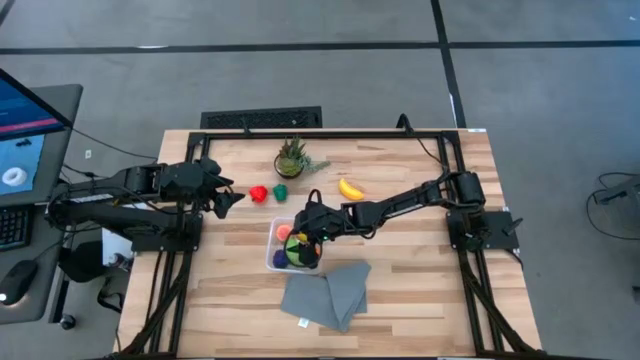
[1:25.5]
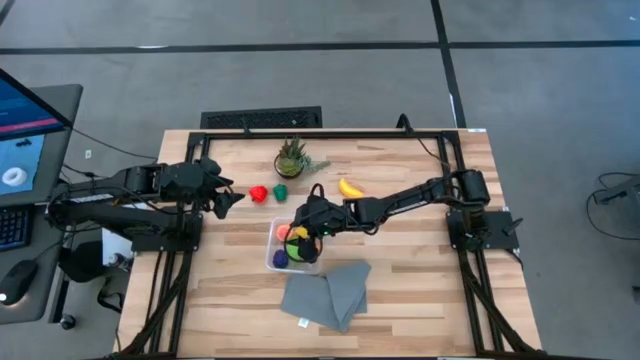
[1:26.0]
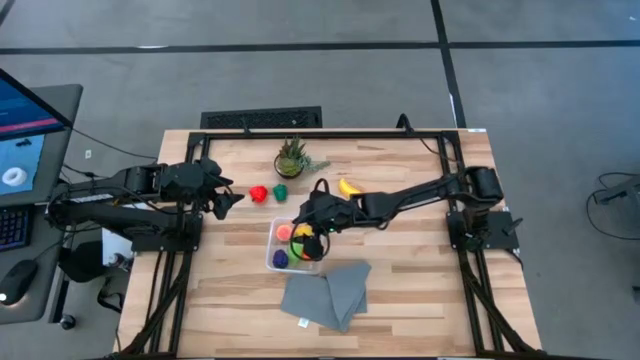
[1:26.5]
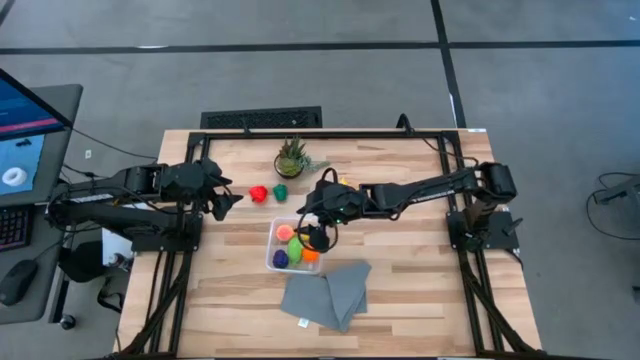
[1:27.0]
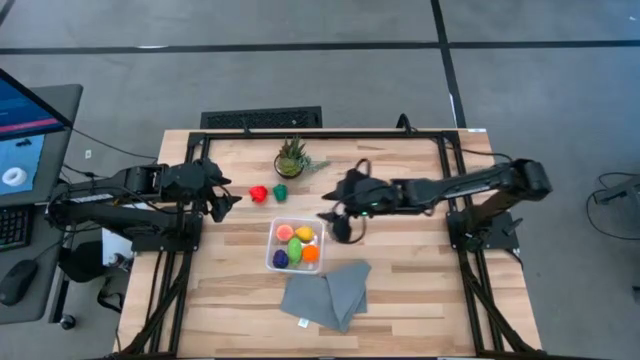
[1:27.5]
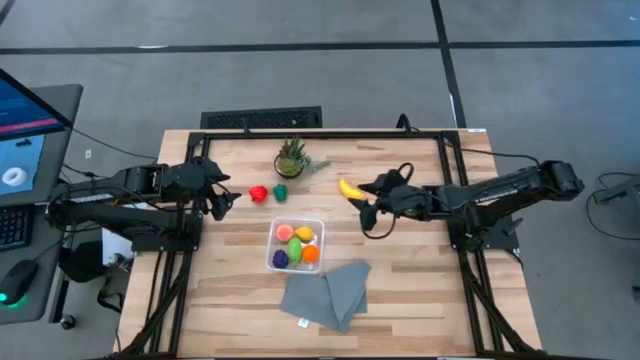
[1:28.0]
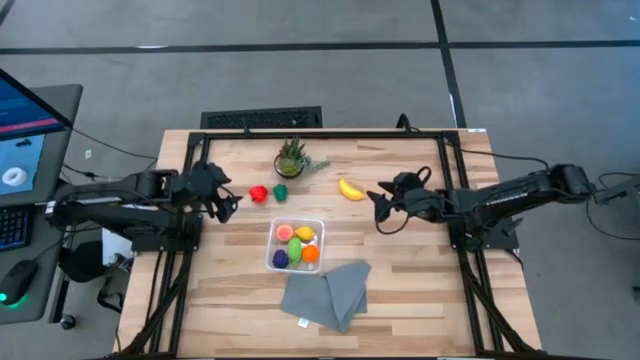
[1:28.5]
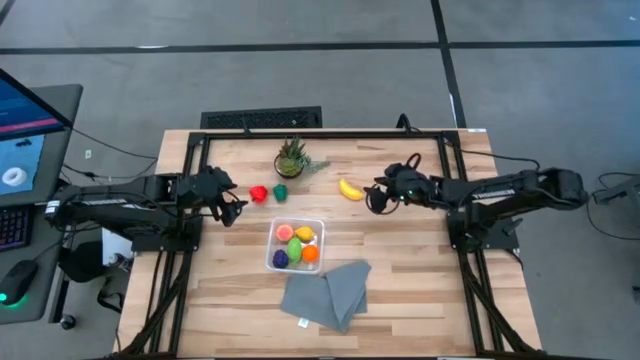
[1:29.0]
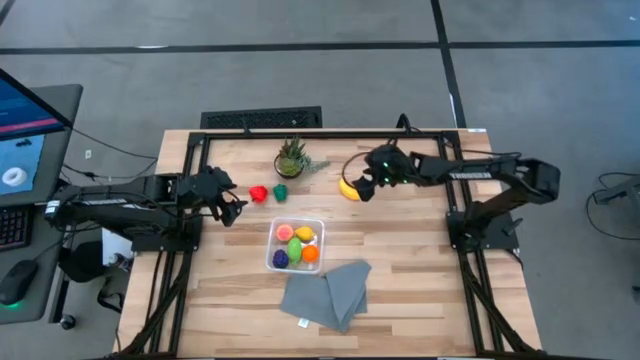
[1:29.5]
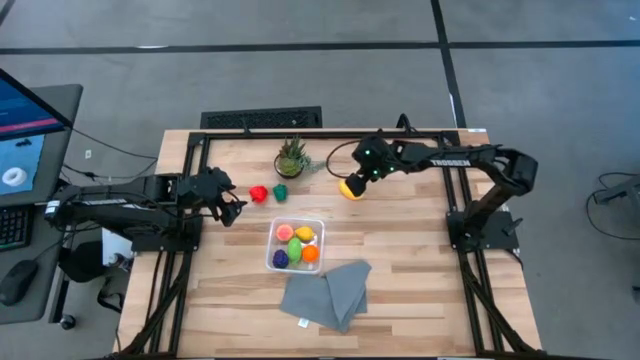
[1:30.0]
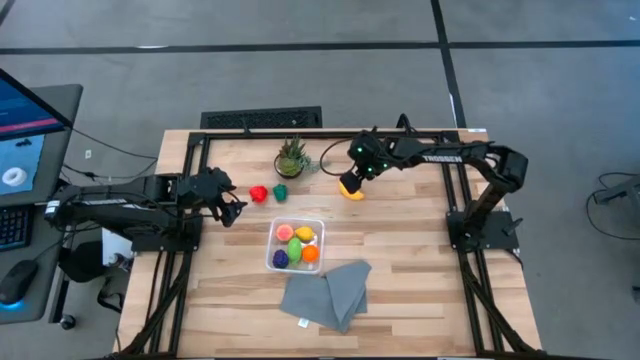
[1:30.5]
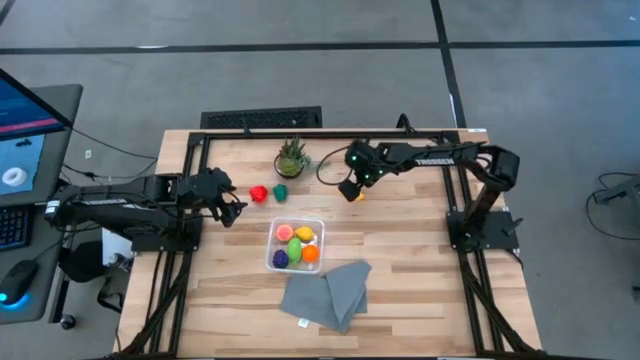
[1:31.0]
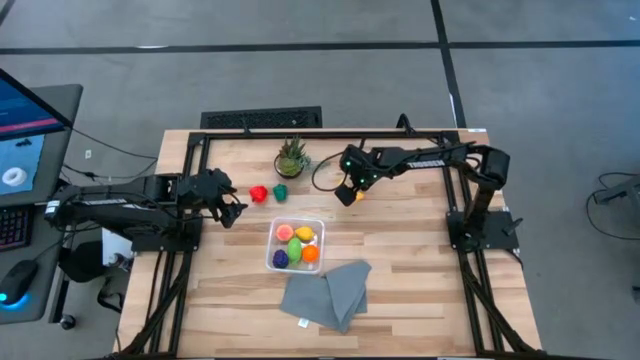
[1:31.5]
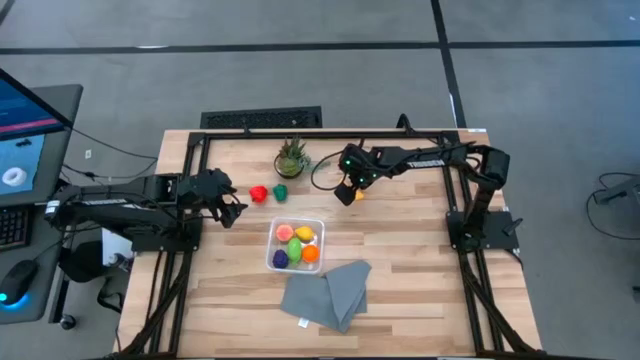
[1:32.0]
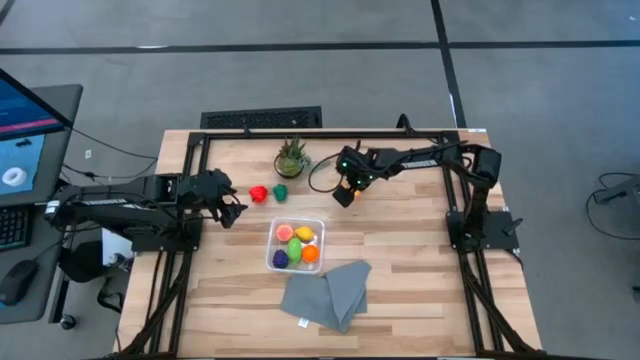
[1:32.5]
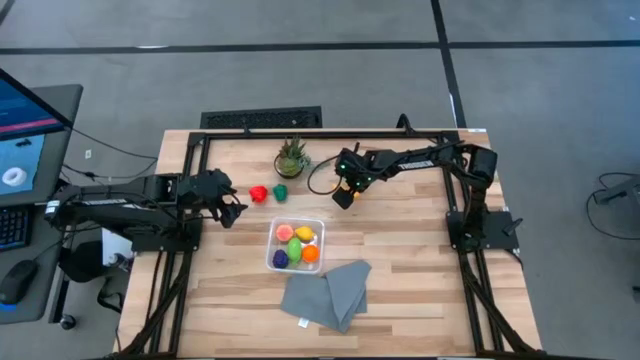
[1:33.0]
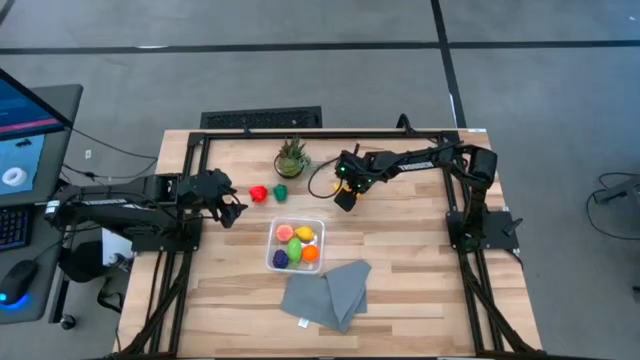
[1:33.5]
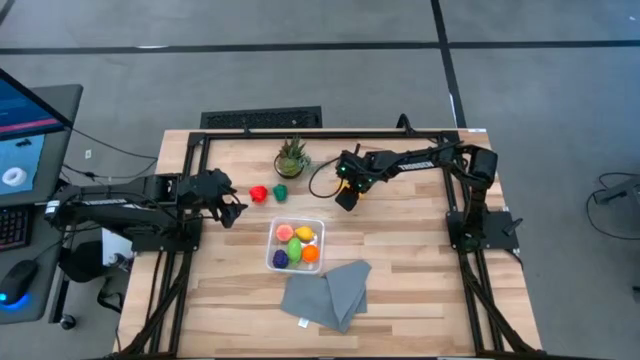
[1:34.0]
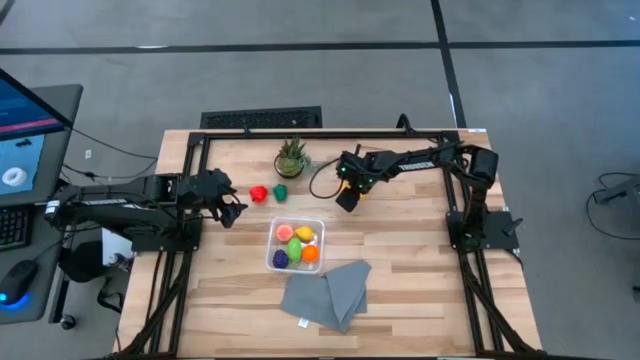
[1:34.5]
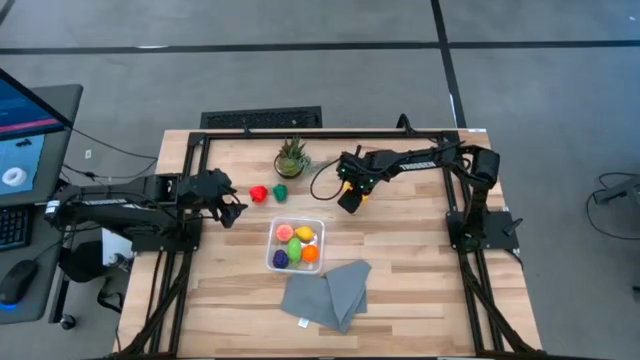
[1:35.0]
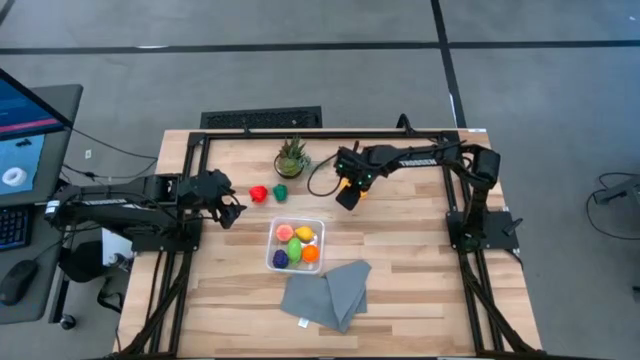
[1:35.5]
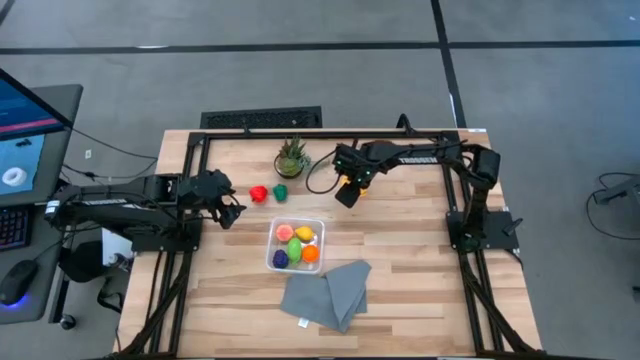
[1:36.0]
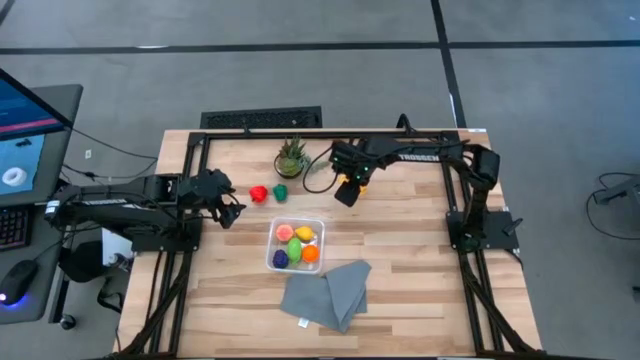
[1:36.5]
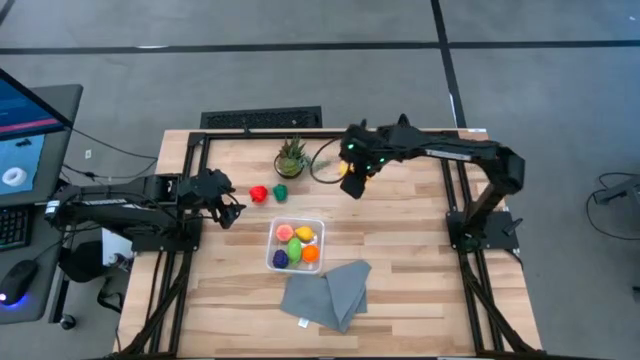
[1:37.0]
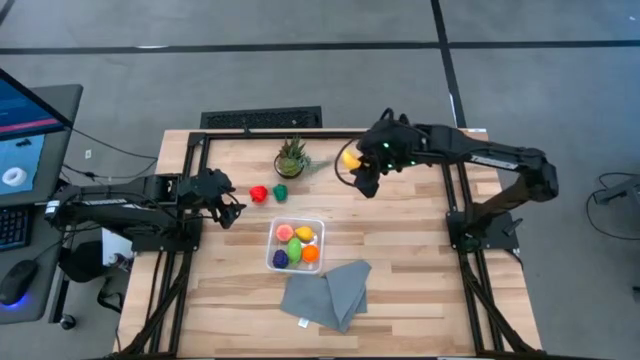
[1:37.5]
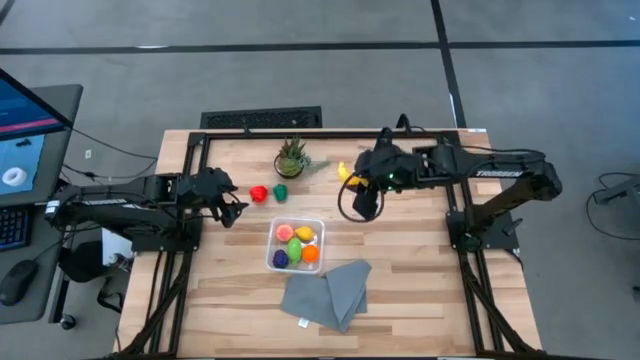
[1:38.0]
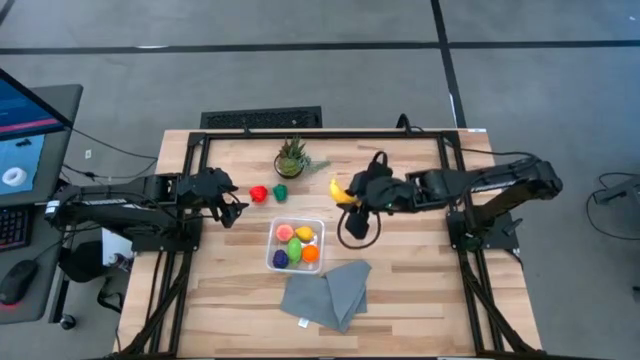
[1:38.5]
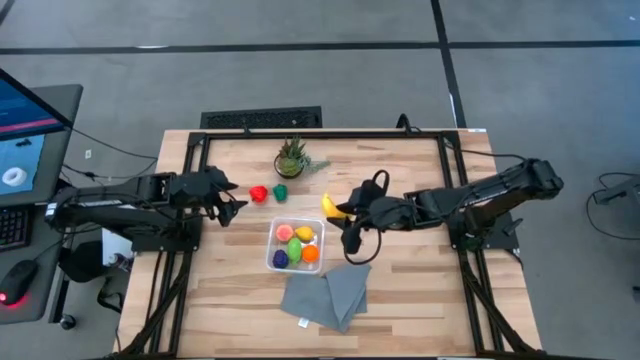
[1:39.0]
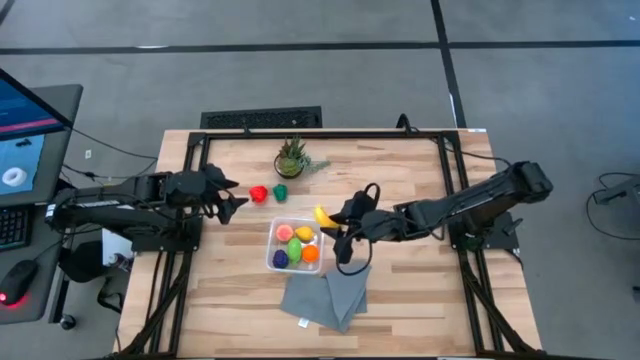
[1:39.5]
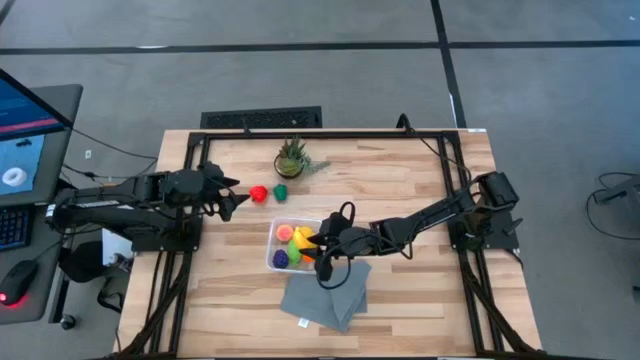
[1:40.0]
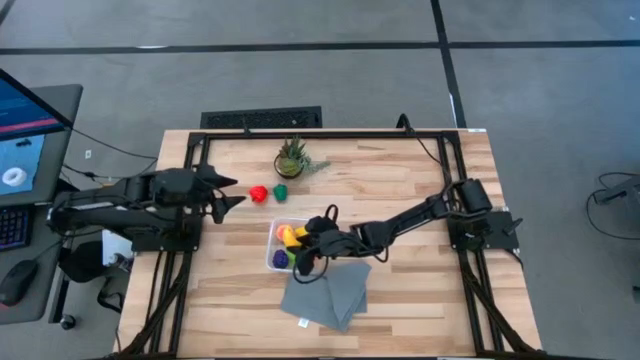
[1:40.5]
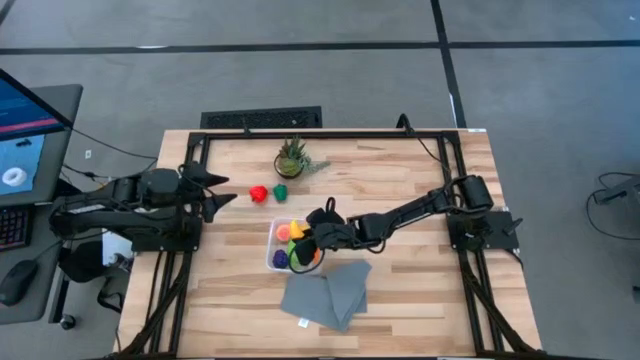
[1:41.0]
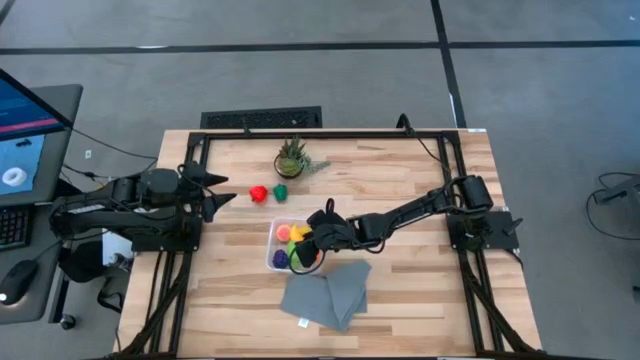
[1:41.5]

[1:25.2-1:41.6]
Task: Pick and placing Produce into tupperware
Put the yellow banana into the transparent container
